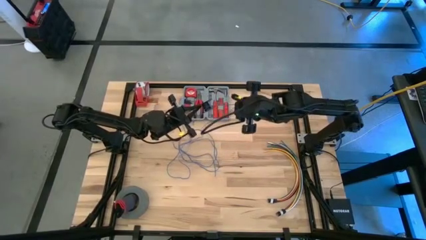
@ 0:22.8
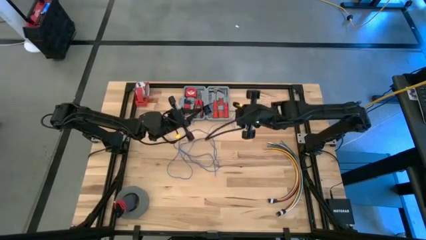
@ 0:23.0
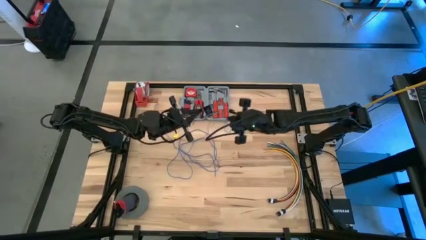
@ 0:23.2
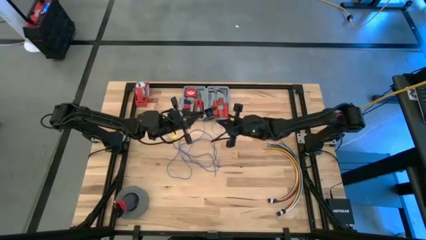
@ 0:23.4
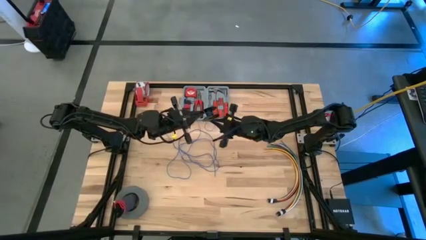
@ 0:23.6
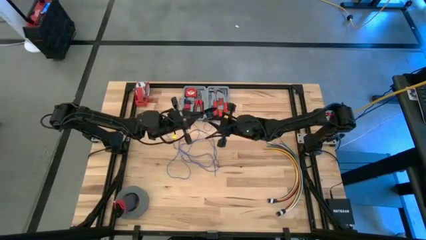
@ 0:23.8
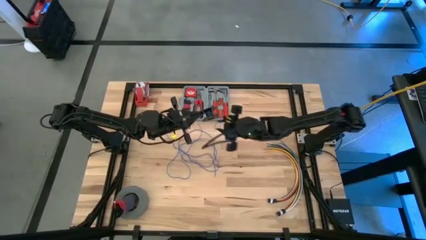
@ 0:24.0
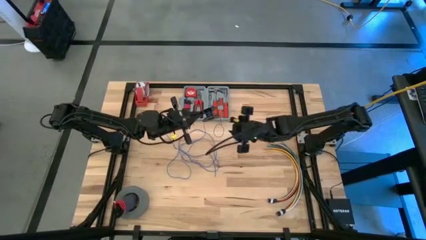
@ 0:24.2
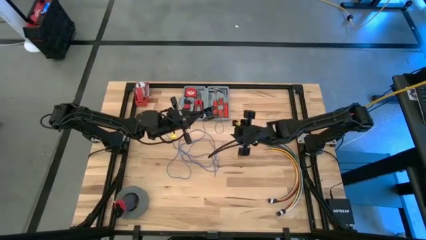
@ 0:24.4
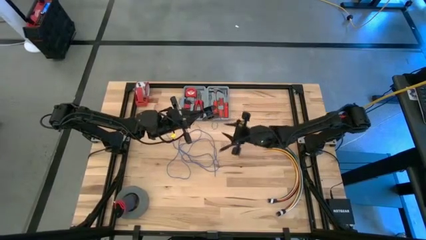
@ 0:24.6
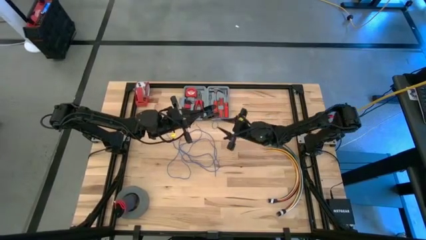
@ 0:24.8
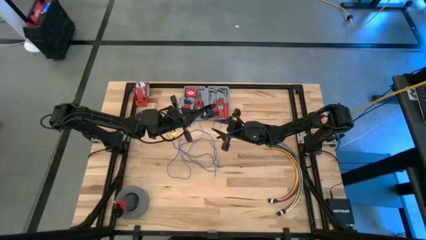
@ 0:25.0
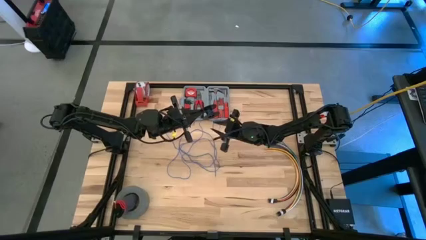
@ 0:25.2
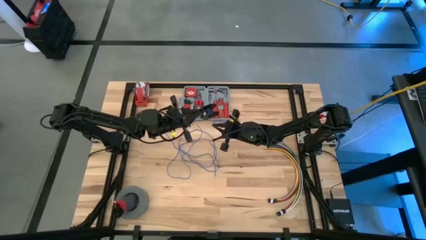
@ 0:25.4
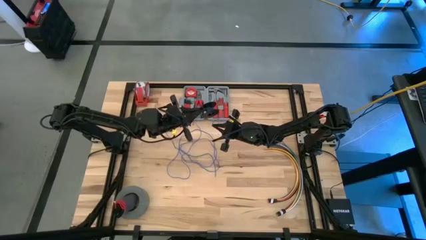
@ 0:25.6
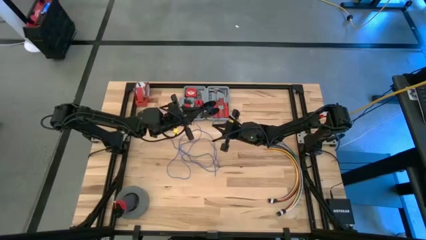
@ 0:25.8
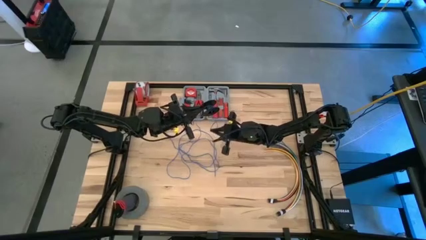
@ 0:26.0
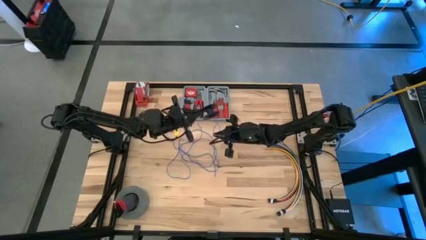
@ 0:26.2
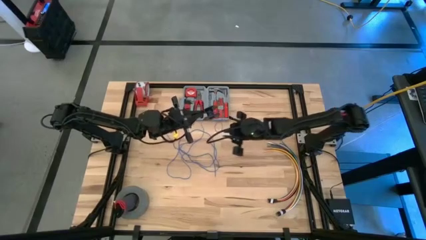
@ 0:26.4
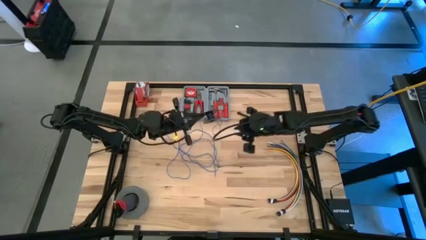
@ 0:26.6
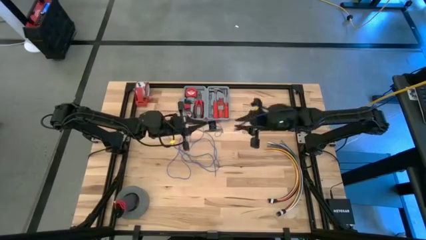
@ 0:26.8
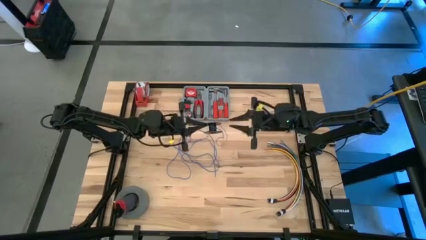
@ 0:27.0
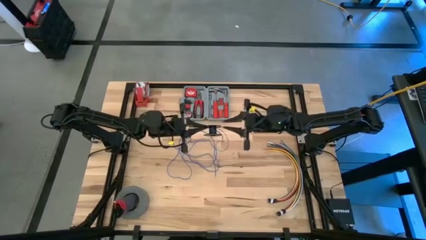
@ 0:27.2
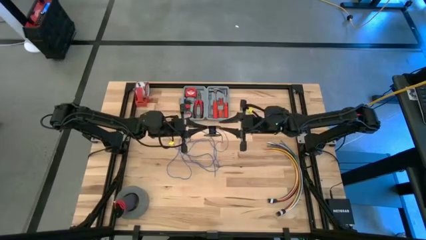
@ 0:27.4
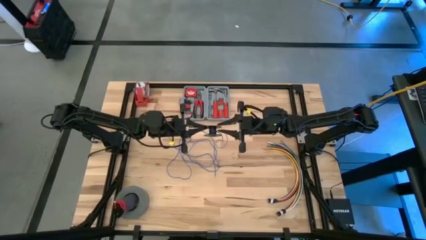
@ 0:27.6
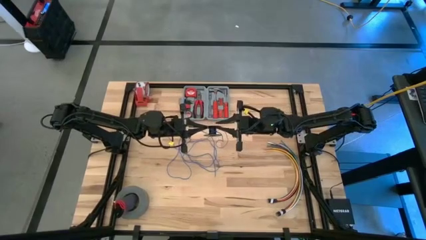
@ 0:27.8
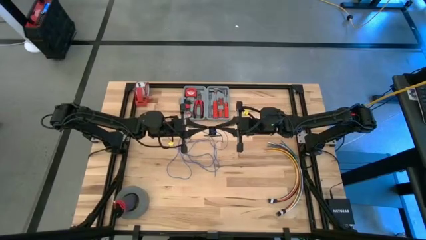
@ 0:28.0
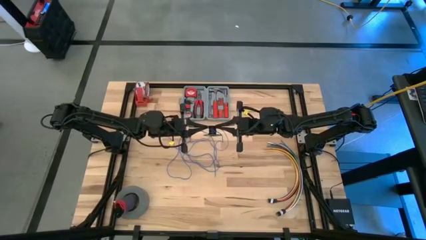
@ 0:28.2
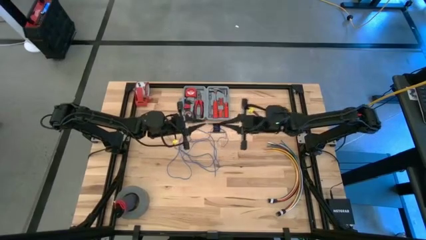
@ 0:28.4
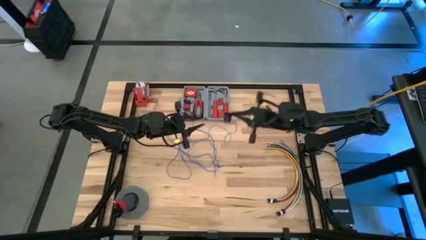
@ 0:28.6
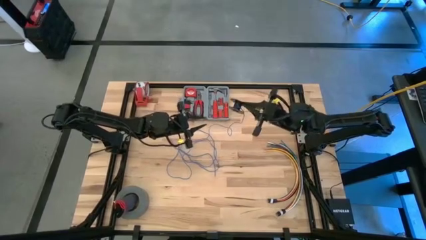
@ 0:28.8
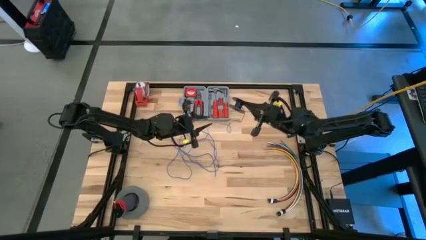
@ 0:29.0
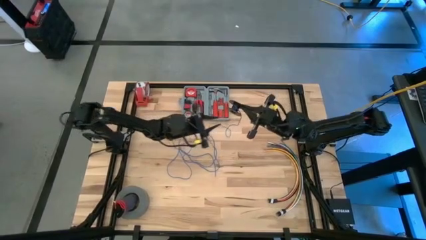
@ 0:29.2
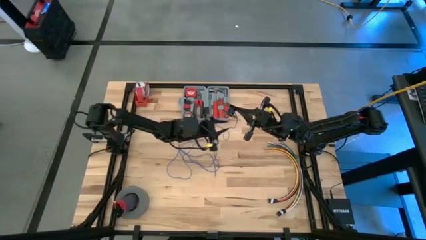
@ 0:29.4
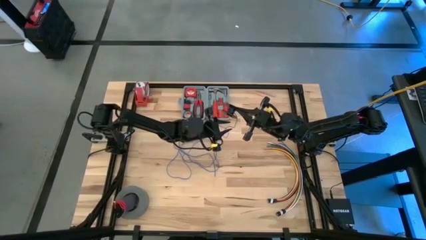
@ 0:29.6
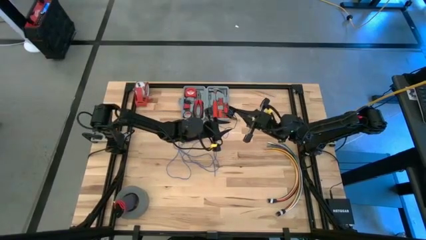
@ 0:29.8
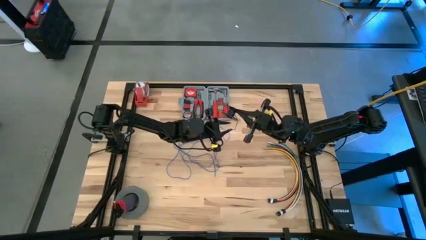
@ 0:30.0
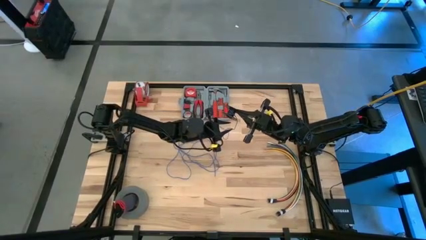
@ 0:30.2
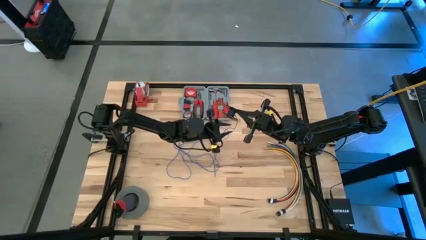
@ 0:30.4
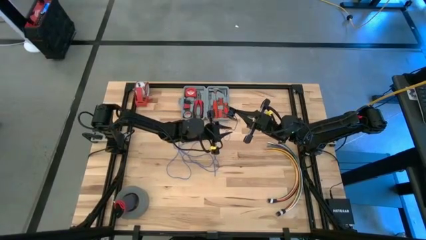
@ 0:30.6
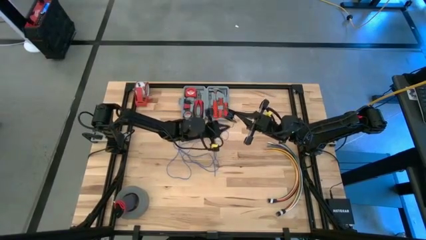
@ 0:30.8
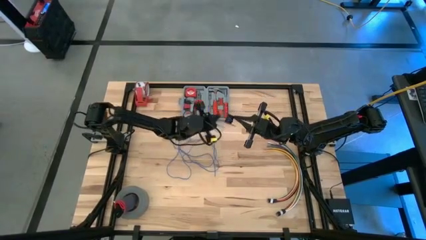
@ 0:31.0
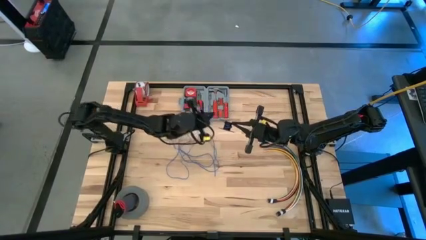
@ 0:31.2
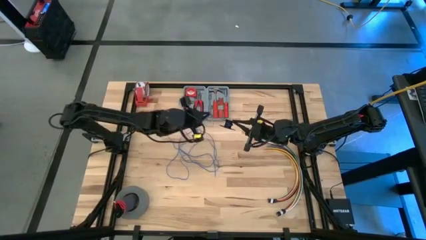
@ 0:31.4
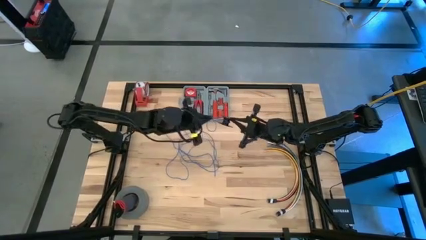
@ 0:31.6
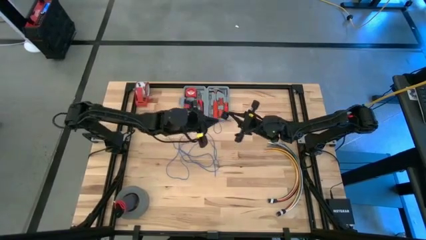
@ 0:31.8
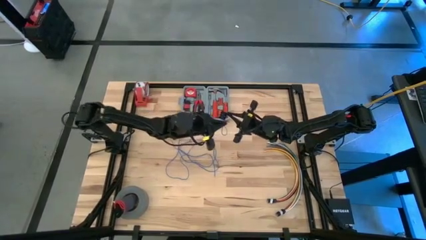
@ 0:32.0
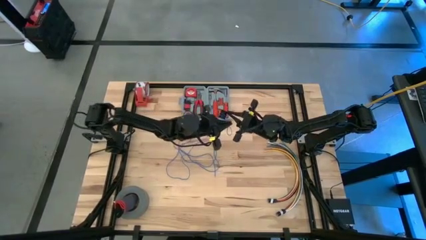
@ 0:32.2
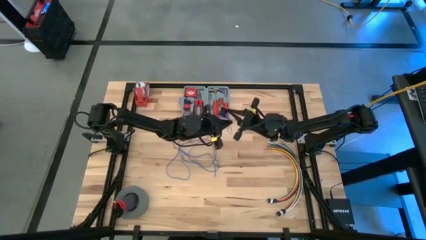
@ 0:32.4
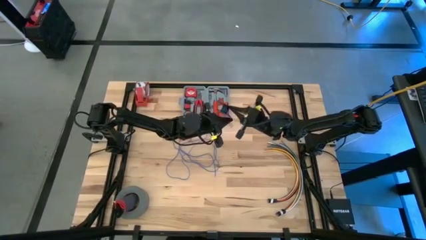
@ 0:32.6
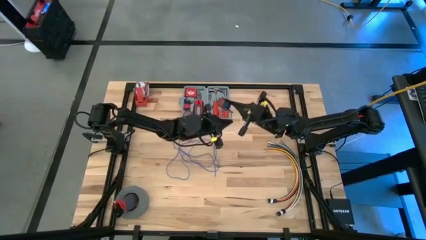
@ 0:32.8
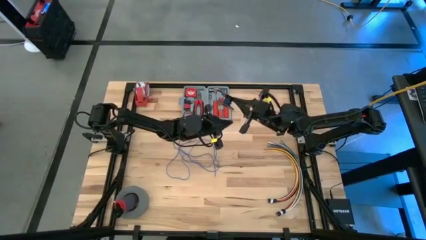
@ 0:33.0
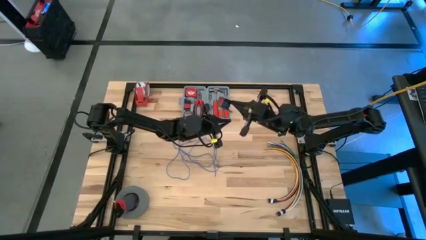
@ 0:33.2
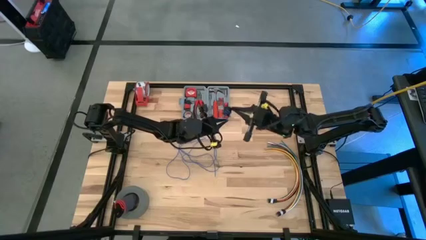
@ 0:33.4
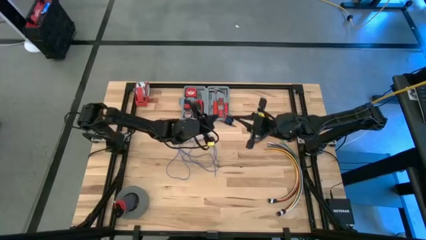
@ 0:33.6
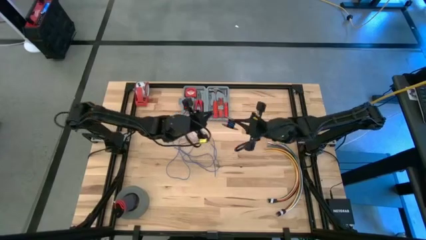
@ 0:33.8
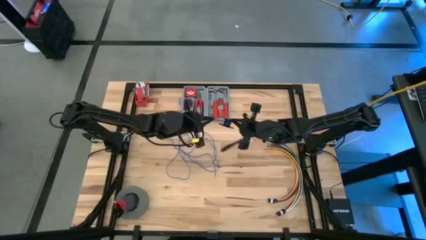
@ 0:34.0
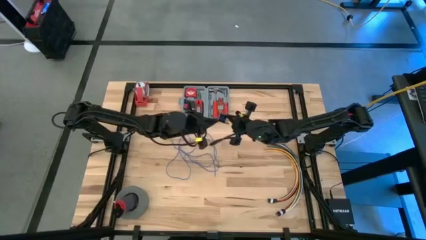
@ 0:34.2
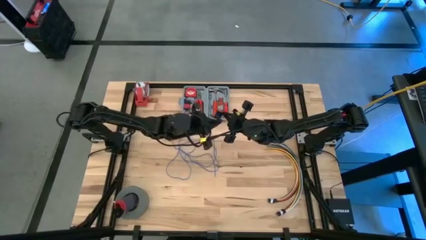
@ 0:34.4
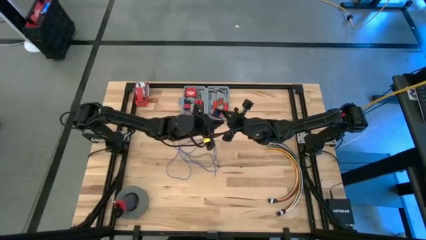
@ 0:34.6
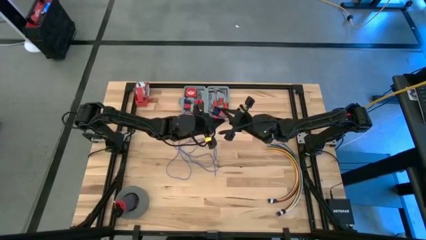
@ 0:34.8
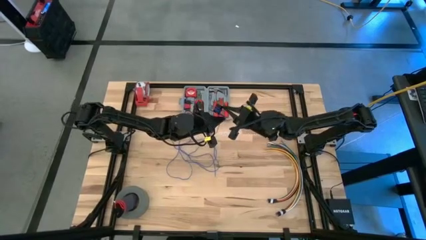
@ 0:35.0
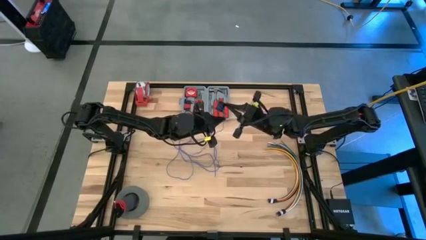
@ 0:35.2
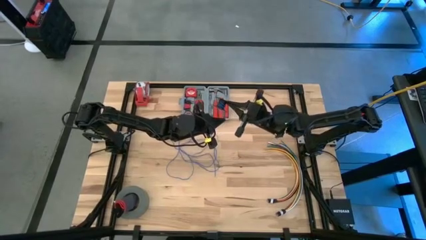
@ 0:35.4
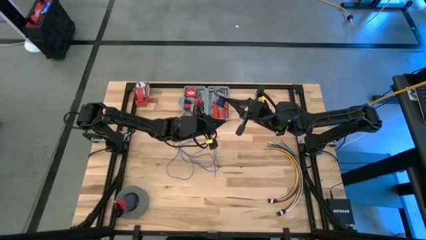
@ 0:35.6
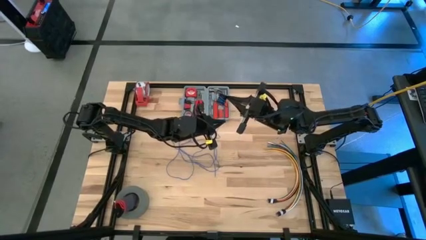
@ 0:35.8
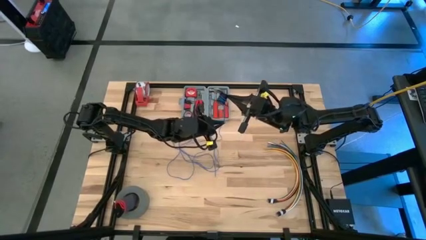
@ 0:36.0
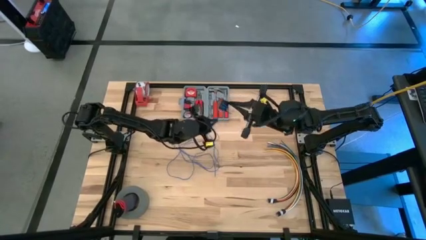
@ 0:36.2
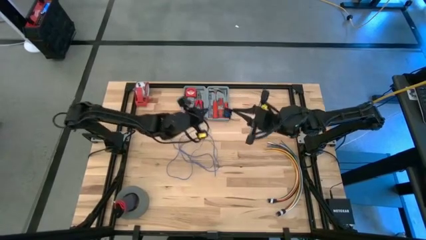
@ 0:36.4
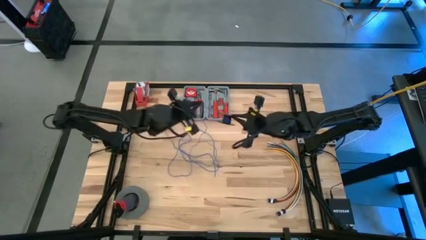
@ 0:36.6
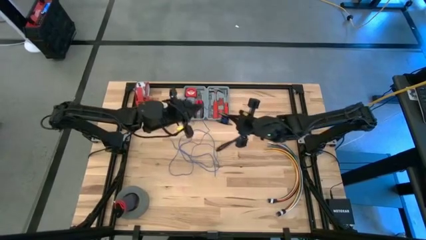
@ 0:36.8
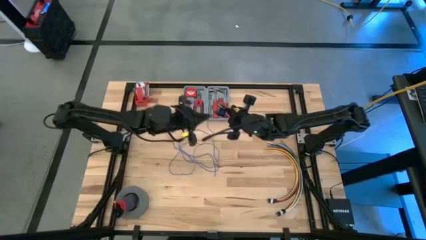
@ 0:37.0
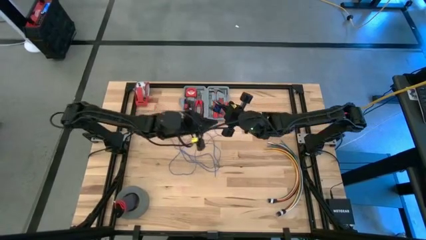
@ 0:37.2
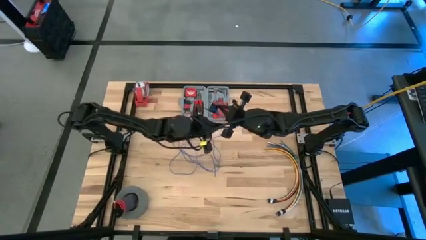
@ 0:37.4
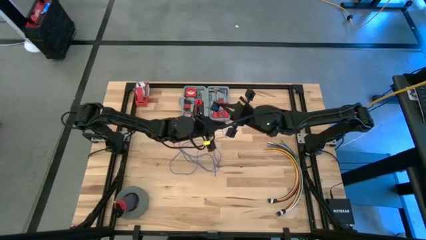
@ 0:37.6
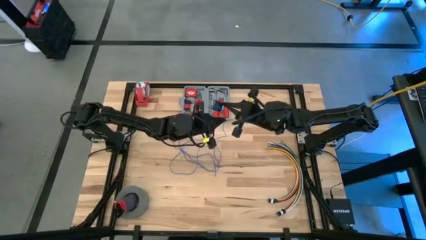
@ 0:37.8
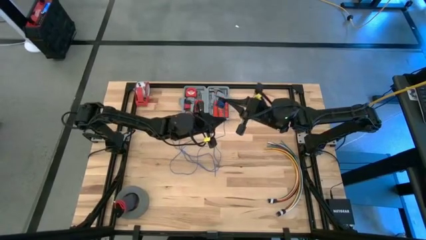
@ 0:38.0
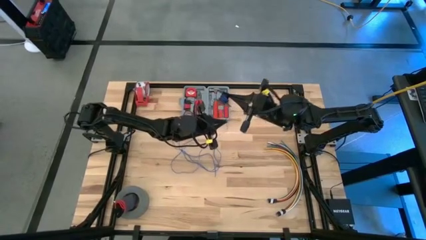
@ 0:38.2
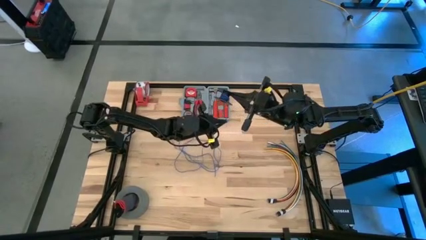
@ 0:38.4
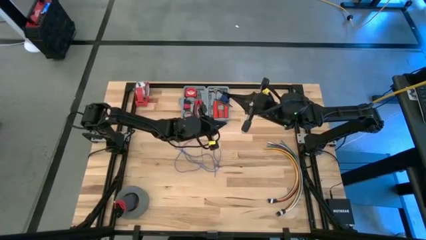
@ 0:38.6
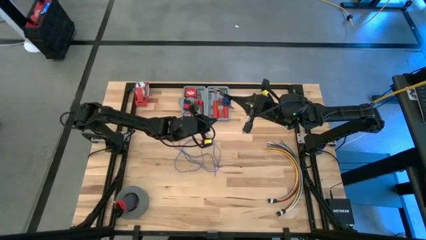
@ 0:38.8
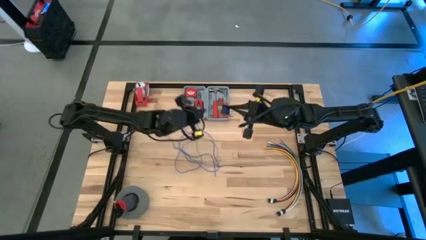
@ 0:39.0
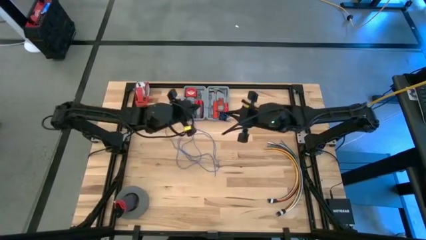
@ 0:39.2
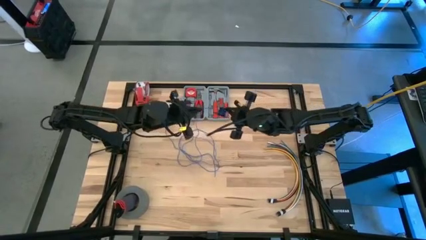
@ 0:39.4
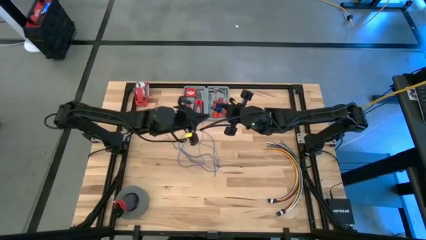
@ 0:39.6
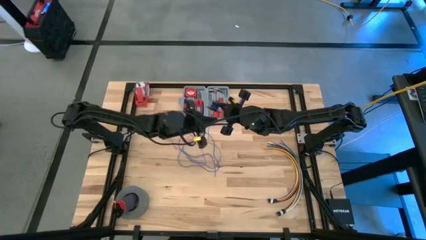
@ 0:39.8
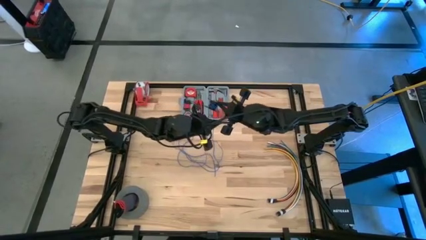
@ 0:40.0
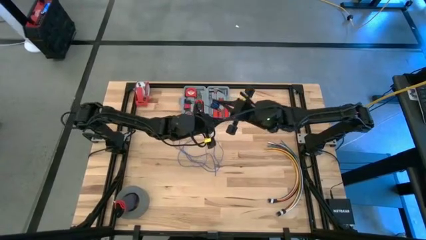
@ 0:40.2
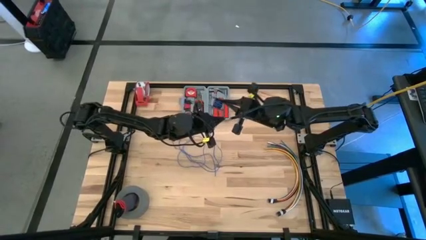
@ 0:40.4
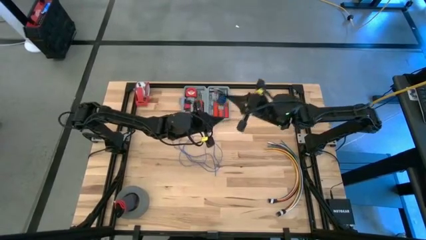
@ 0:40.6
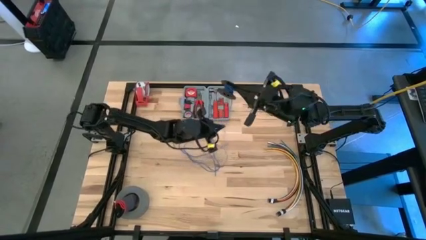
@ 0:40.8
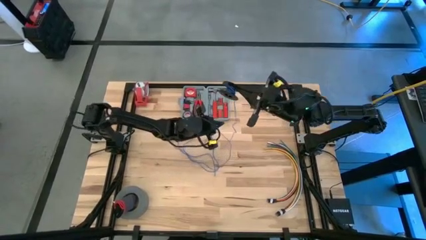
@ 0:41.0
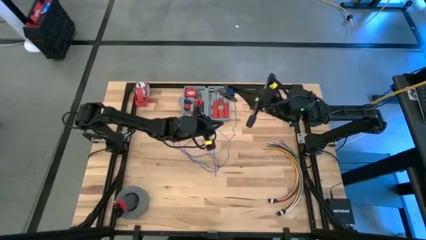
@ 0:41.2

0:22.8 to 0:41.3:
Task: Coil cords
Coil the blue wire into the black spool
